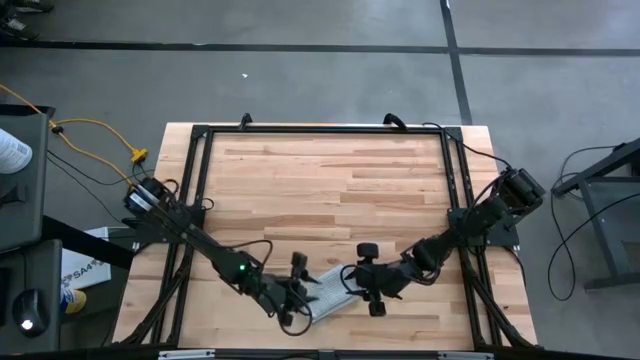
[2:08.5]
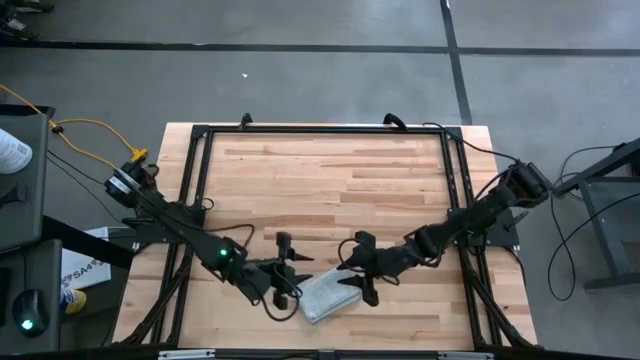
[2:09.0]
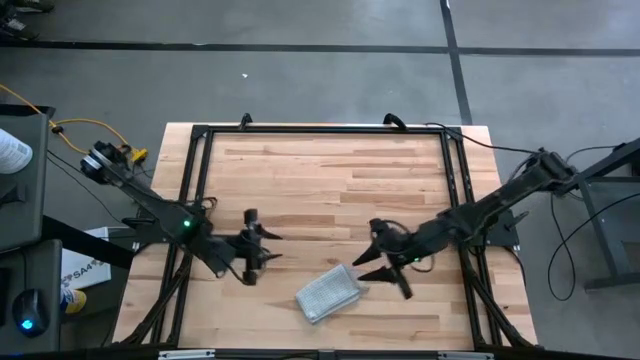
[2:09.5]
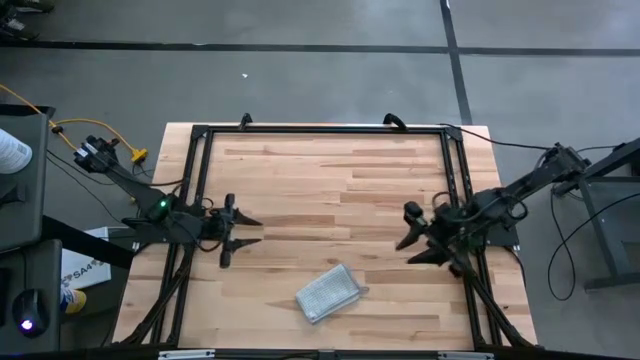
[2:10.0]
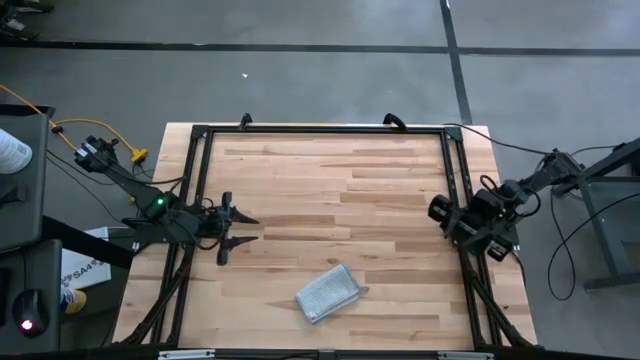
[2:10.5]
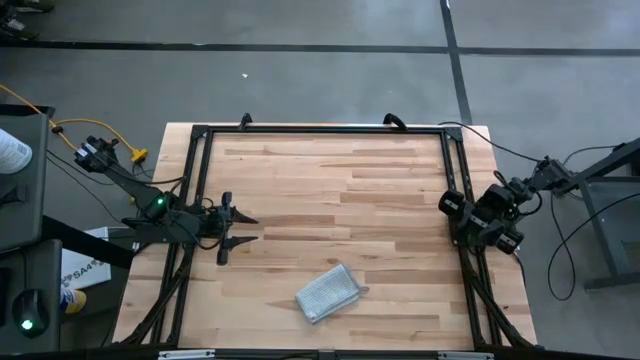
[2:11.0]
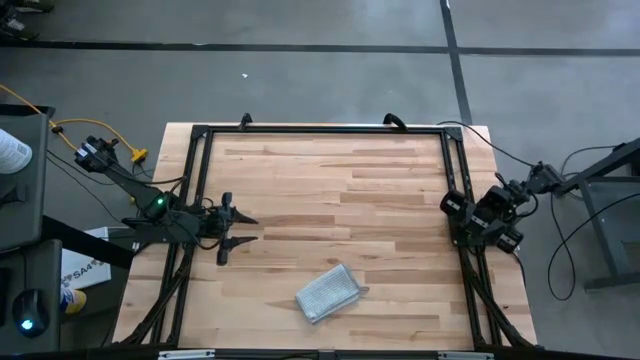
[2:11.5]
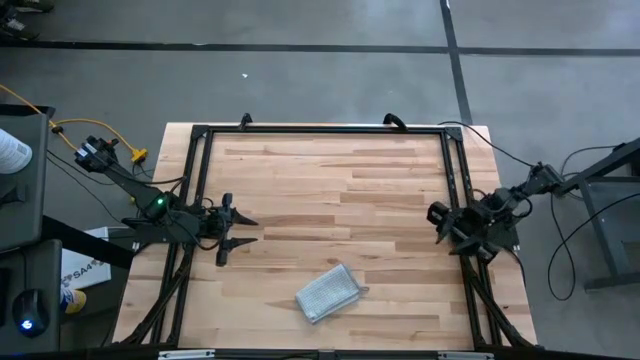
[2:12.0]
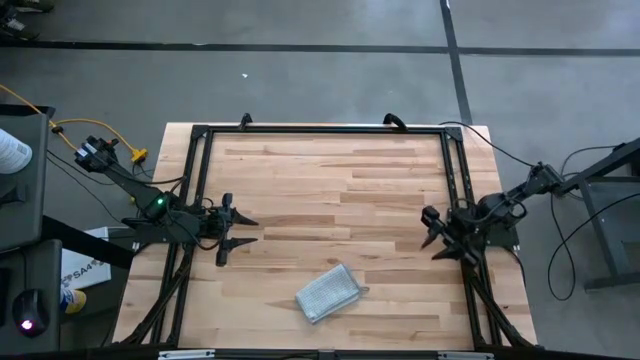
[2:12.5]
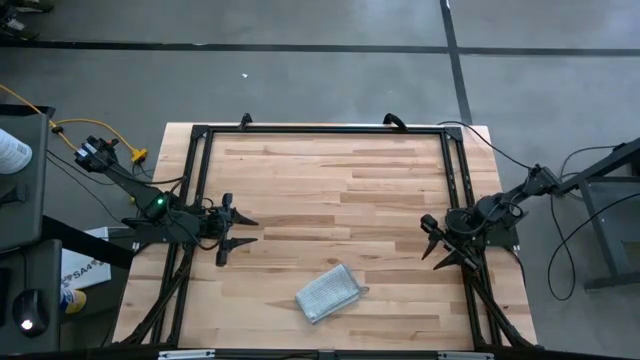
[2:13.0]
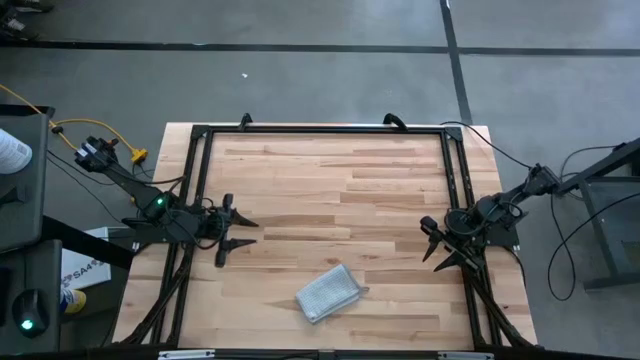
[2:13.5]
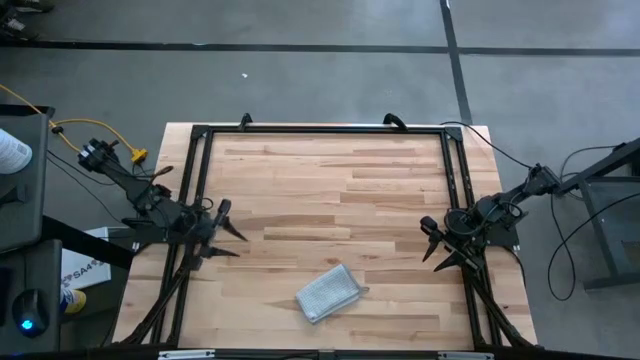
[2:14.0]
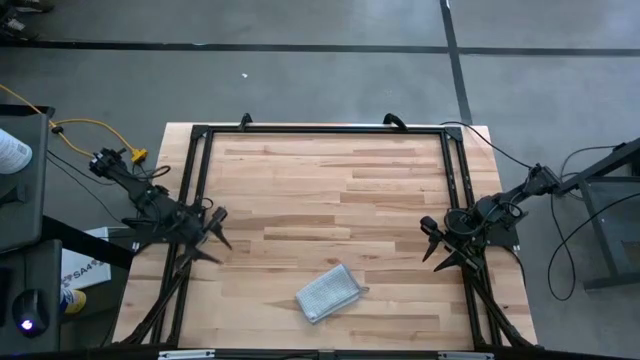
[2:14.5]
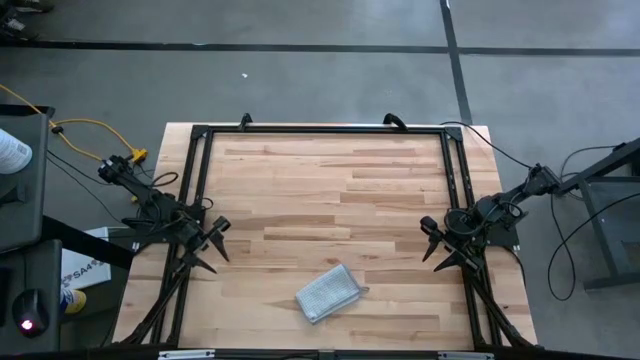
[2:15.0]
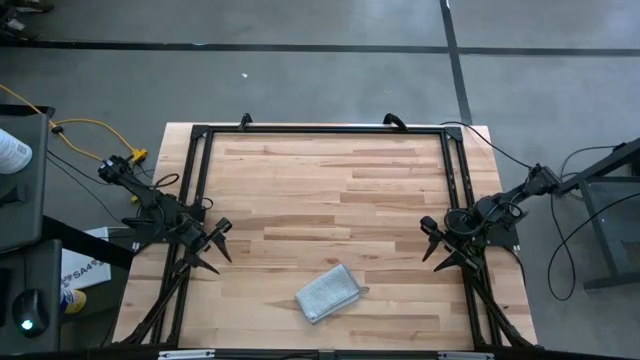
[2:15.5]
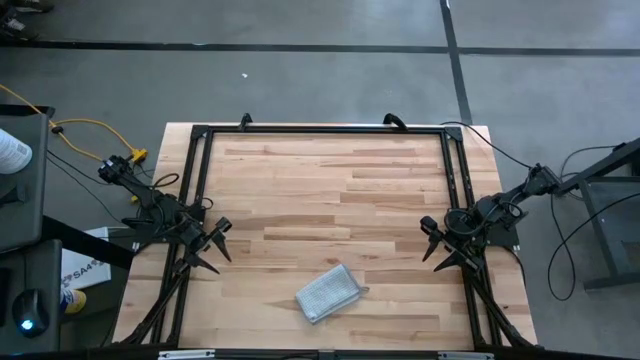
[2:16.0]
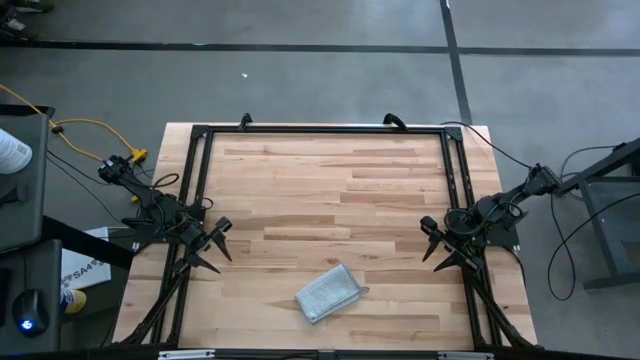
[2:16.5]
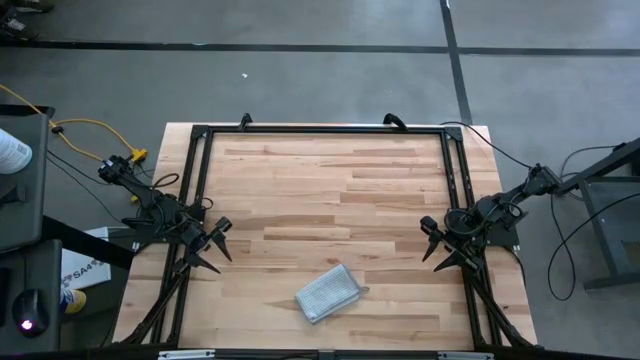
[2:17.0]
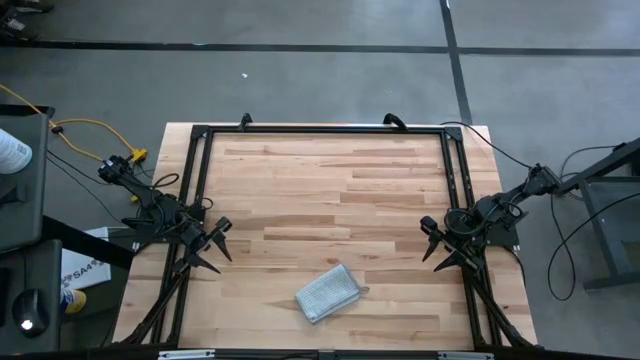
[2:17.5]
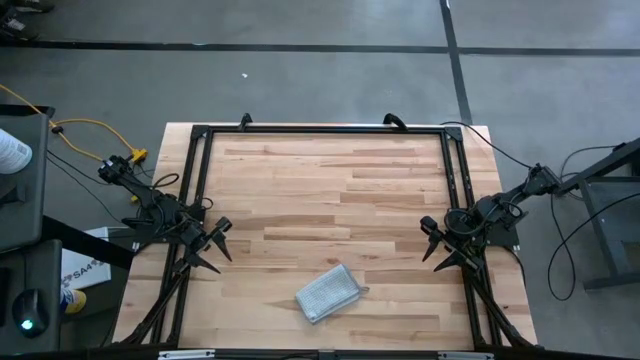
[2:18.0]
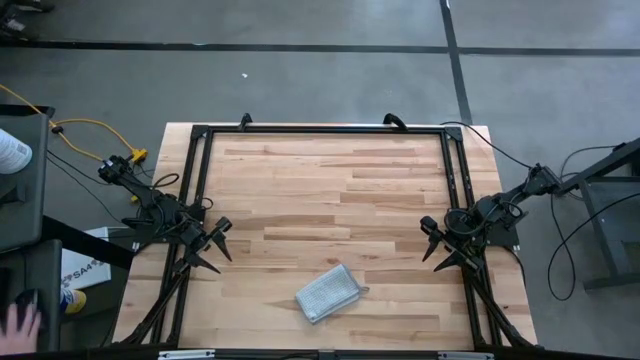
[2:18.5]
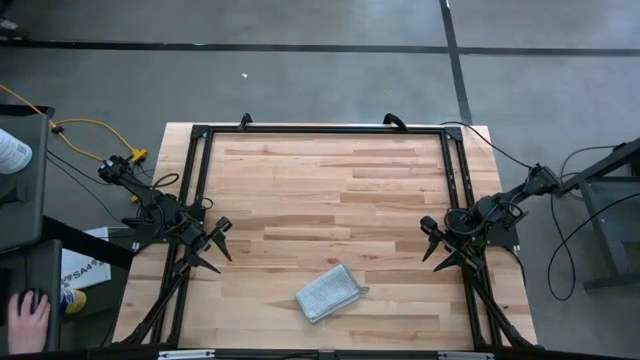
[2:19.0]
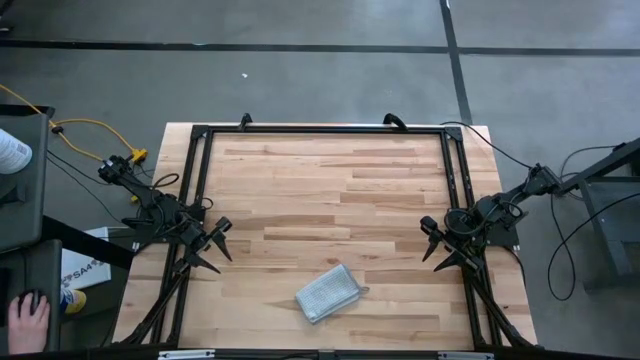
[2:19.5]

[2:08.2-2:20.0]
Task: Fold microfiber towels
Return to Home Position

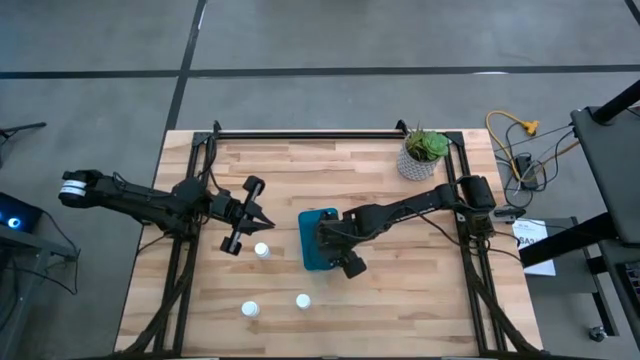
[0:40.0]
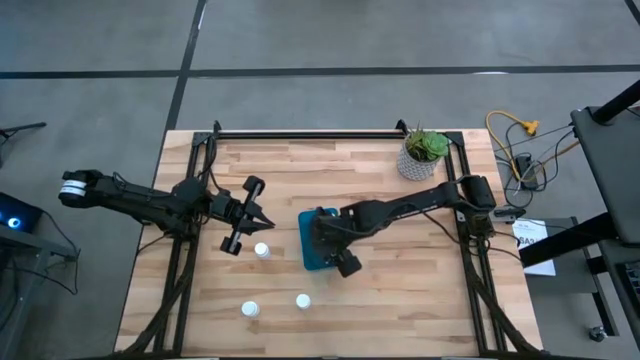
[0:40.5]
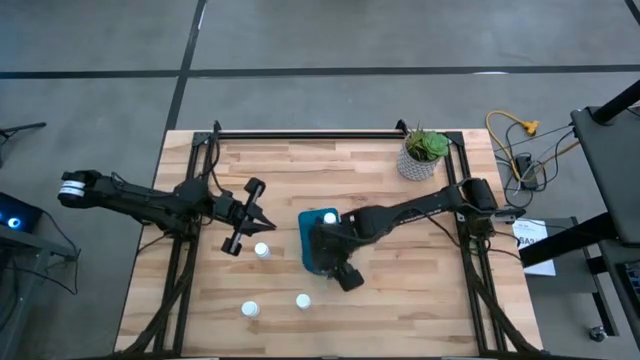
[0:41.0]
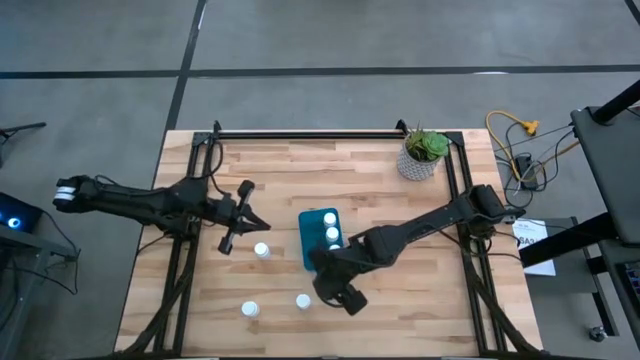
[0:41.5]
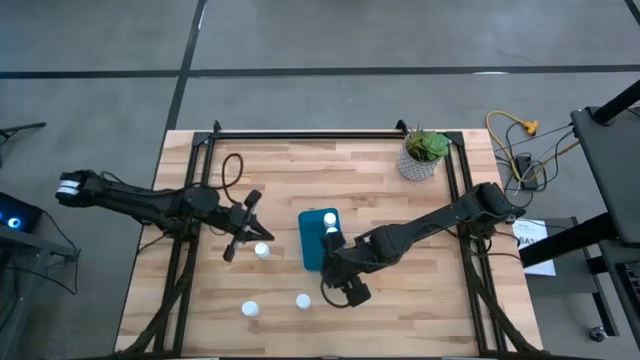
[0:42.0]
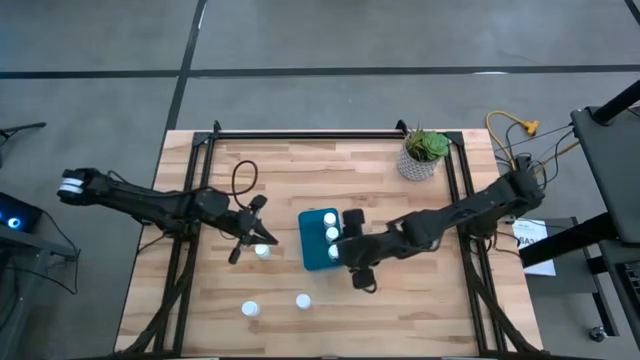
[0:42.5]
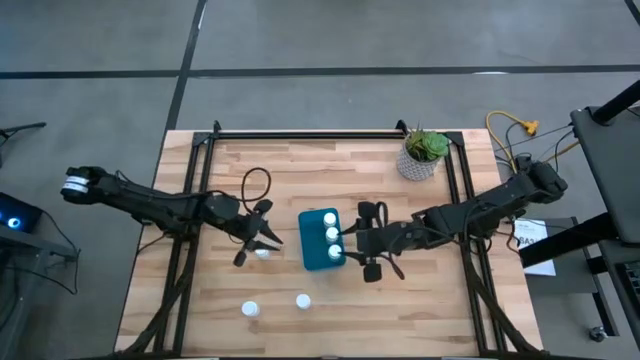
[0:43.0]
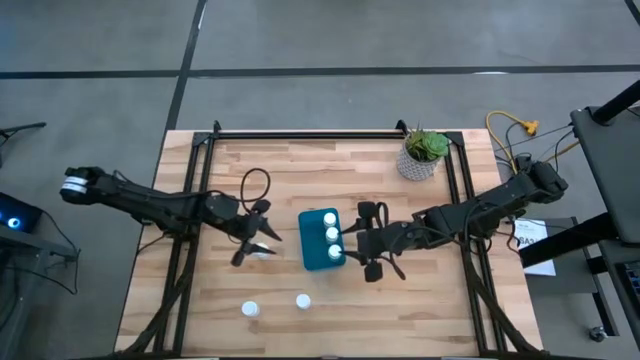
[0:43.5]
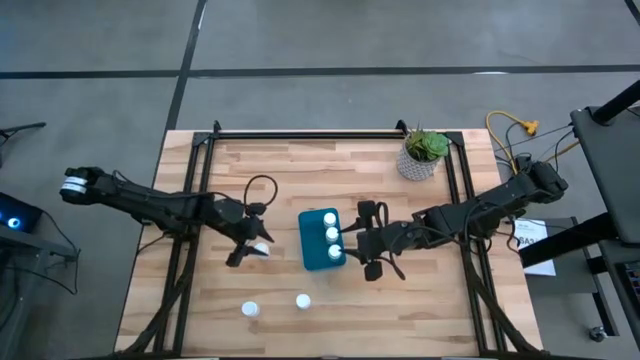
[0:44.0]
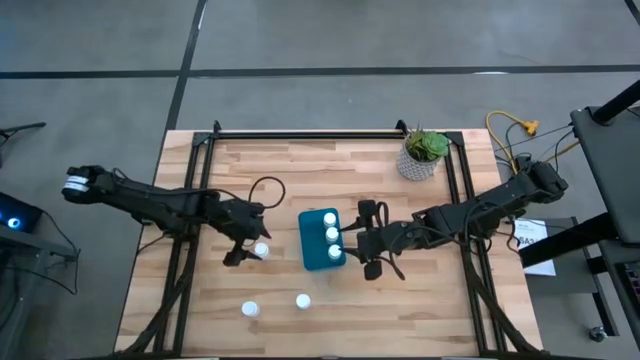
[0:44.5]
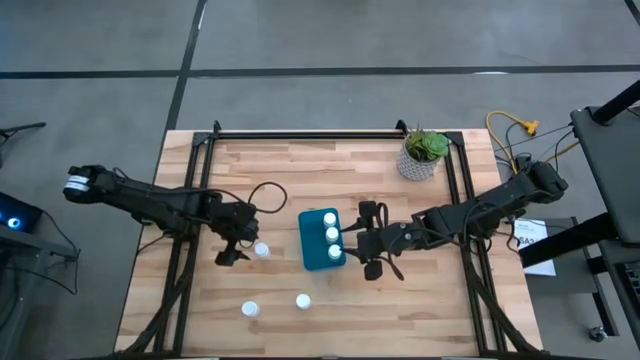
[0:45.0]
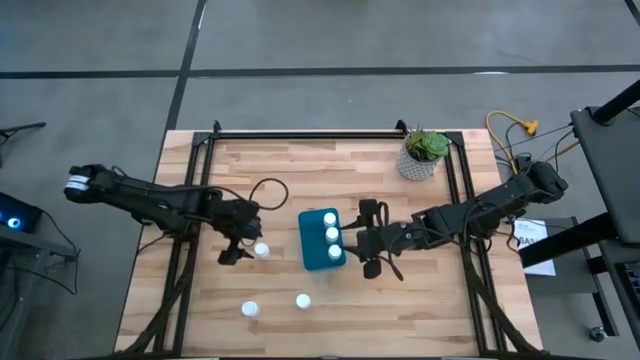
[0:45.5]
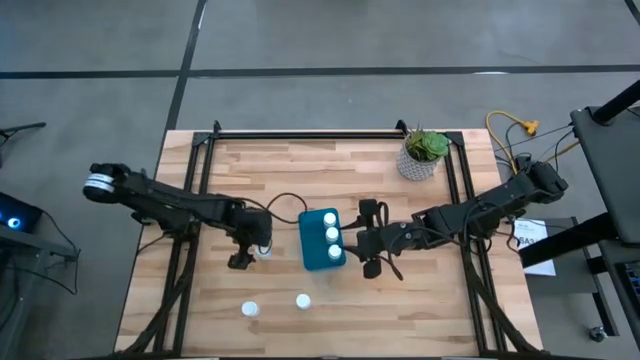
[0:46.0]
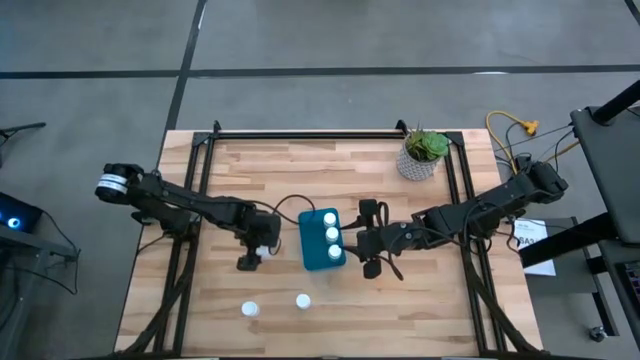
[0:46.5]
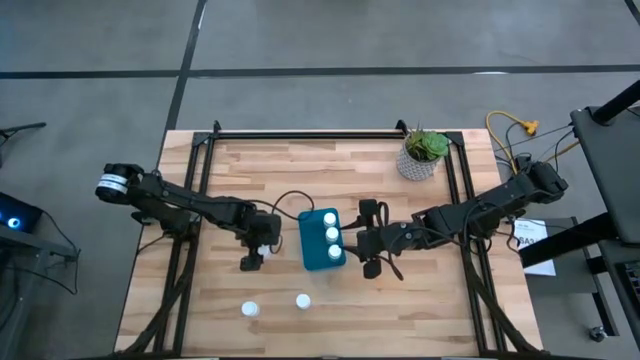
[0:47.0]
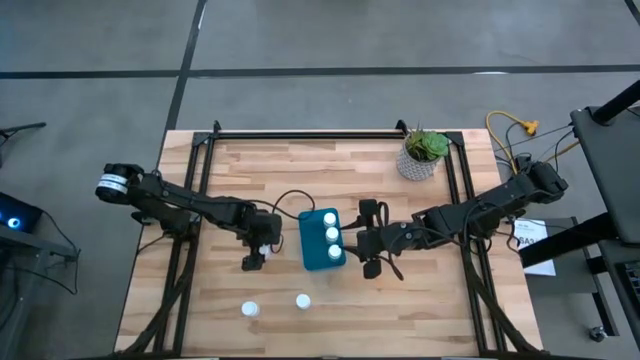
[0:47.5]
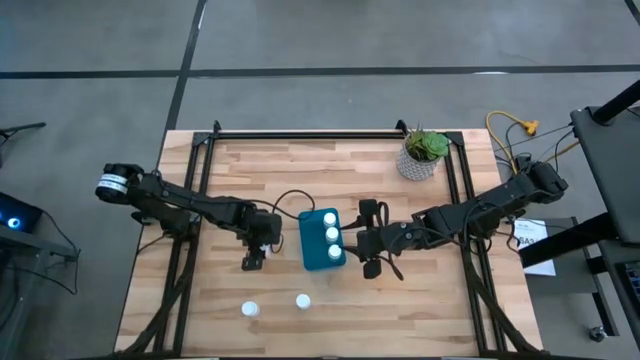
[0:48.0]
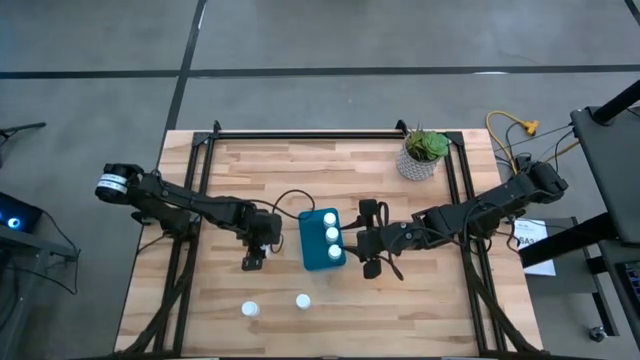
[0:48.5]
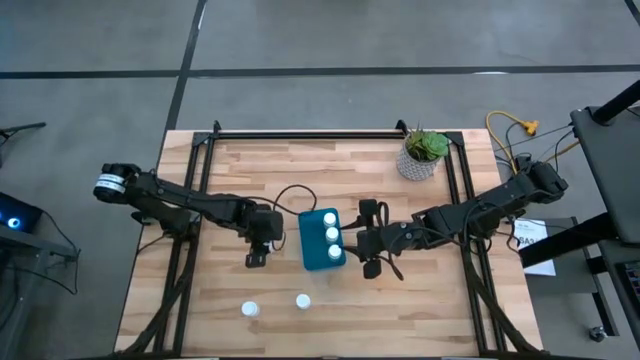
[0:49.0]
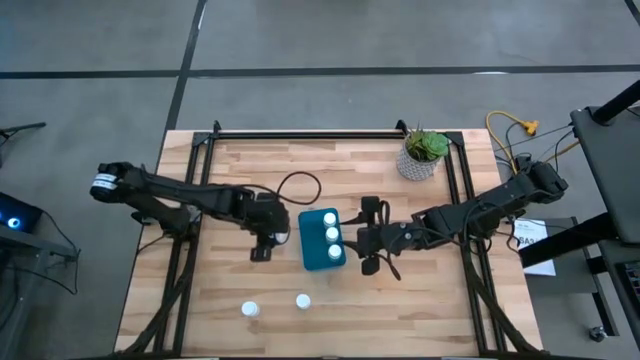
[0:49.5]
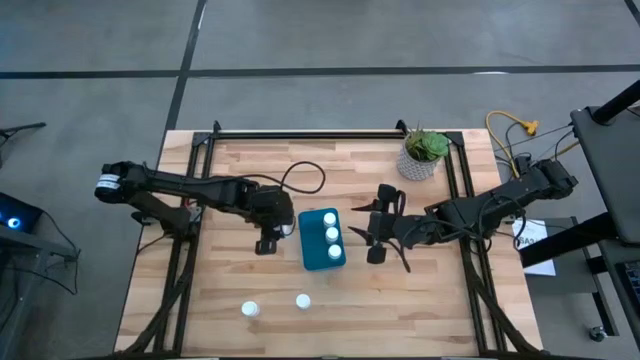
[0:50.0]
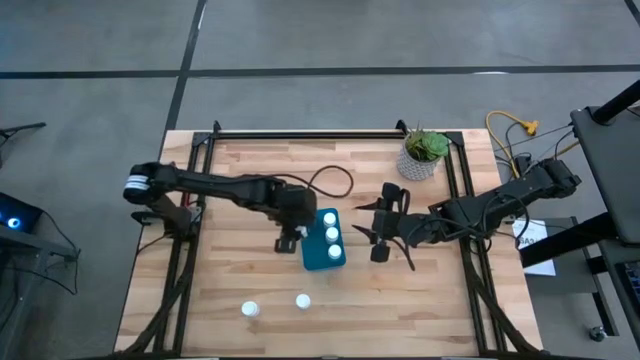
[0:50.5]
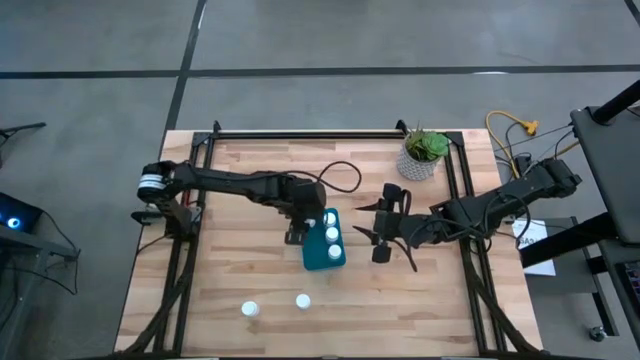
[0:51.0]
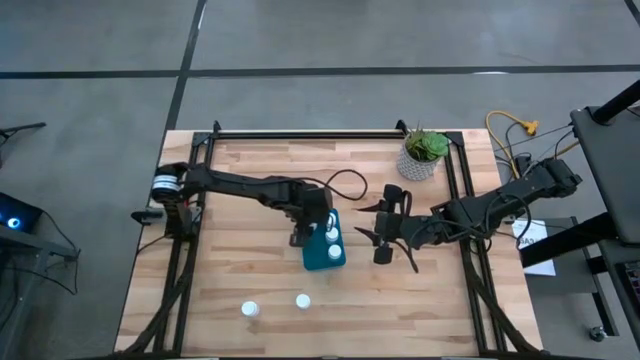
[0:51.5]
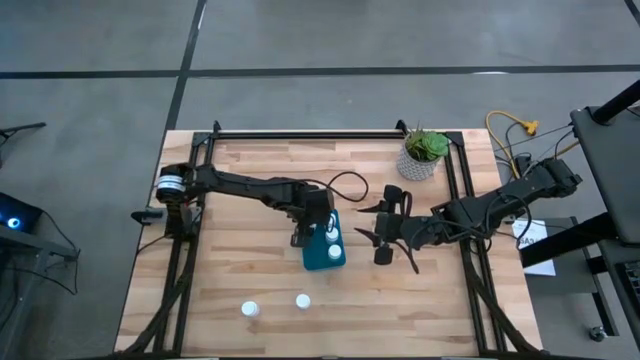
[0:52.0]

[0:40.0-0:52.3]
Task: Pick and place pill bottles into a basket
Put the white pill bottle into the blue bin
